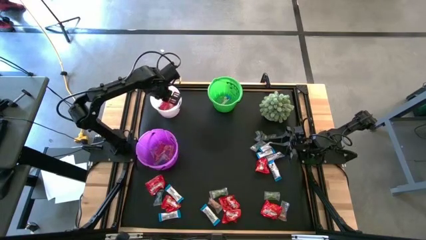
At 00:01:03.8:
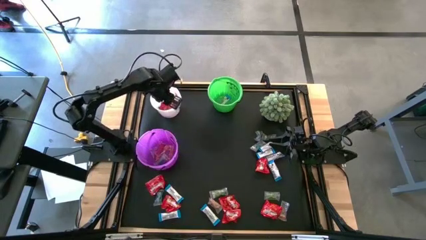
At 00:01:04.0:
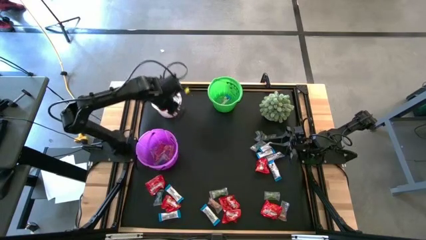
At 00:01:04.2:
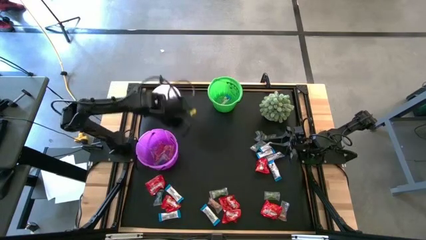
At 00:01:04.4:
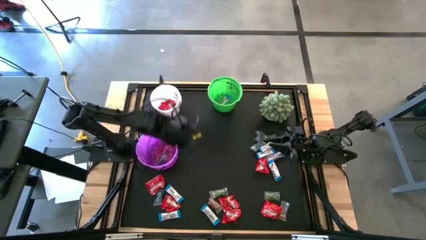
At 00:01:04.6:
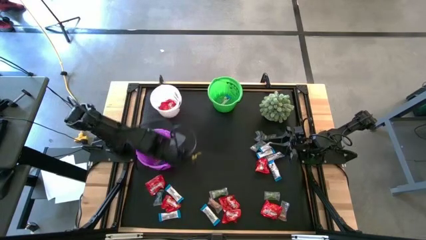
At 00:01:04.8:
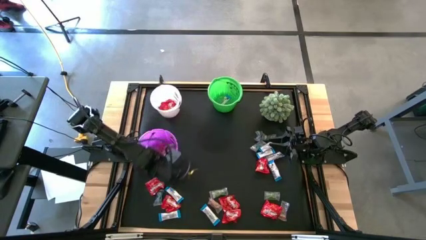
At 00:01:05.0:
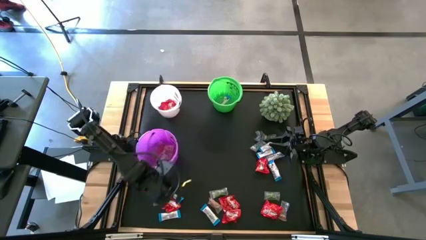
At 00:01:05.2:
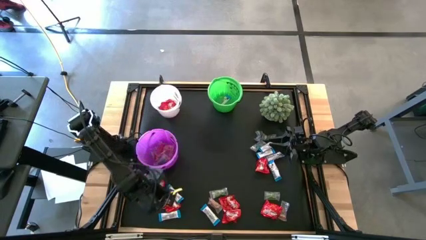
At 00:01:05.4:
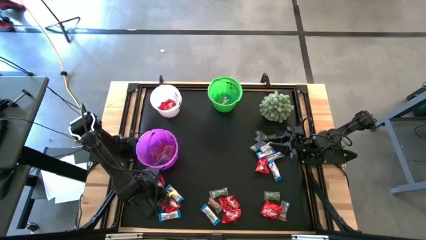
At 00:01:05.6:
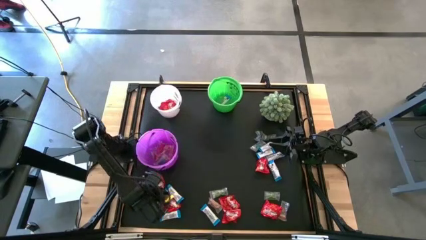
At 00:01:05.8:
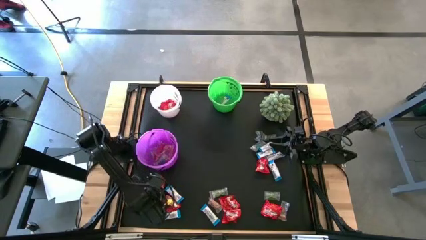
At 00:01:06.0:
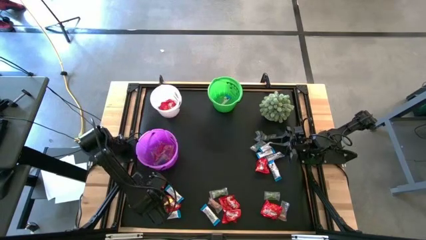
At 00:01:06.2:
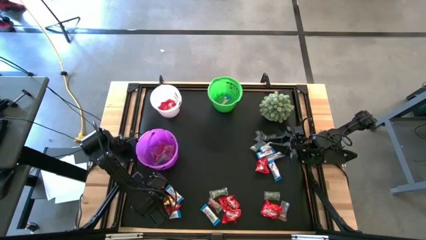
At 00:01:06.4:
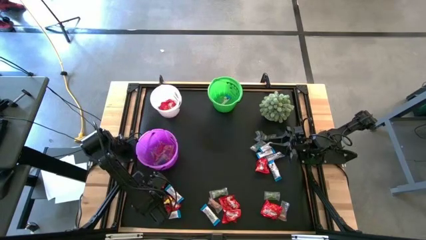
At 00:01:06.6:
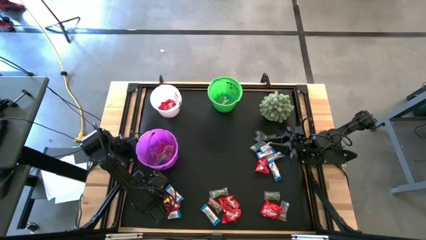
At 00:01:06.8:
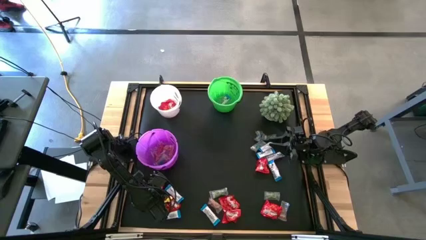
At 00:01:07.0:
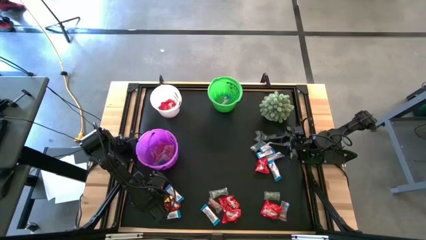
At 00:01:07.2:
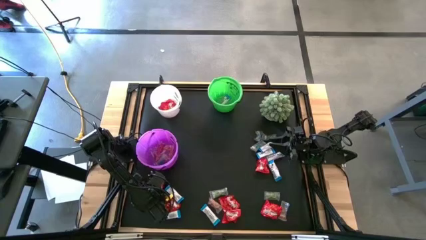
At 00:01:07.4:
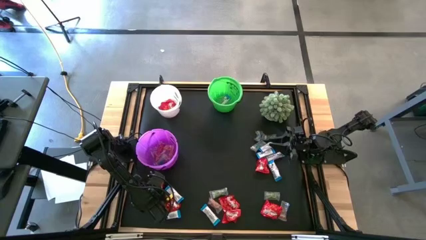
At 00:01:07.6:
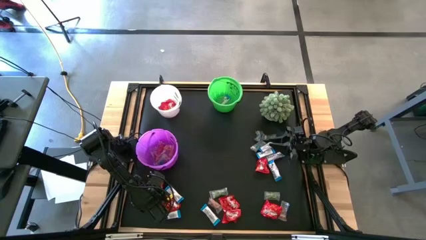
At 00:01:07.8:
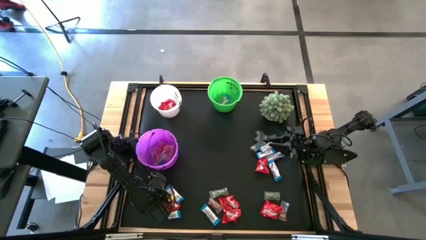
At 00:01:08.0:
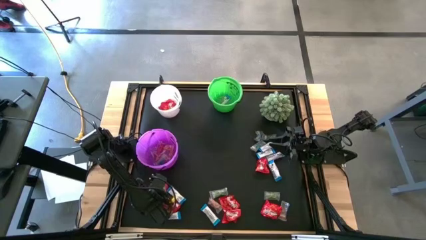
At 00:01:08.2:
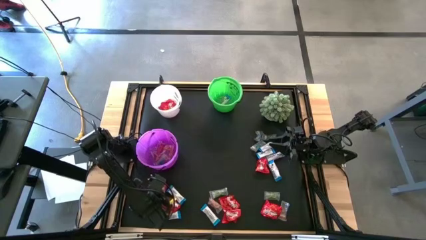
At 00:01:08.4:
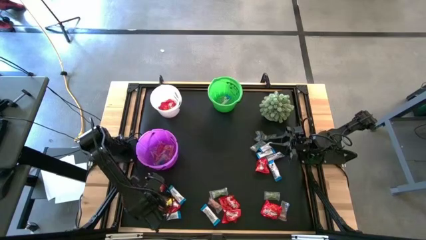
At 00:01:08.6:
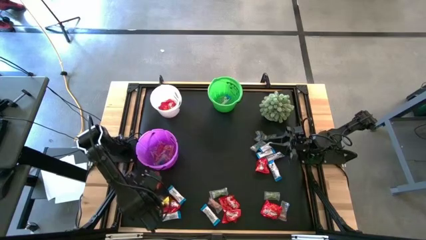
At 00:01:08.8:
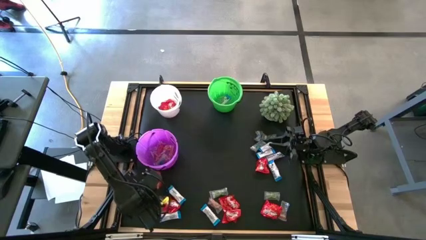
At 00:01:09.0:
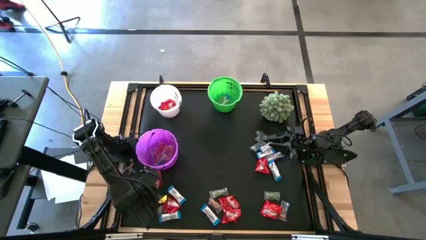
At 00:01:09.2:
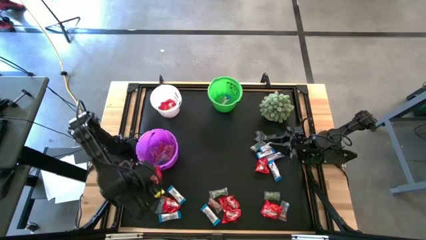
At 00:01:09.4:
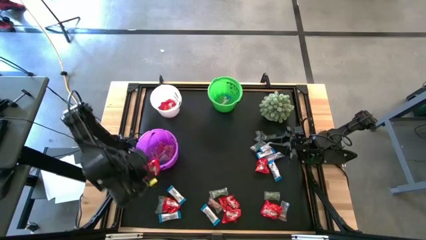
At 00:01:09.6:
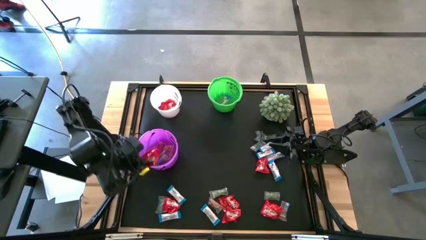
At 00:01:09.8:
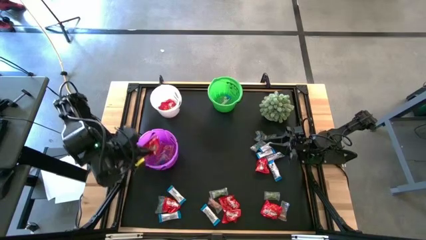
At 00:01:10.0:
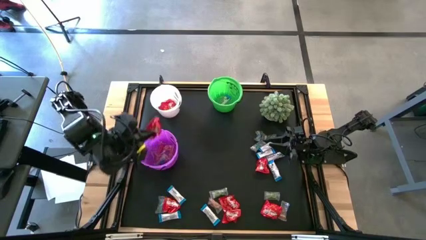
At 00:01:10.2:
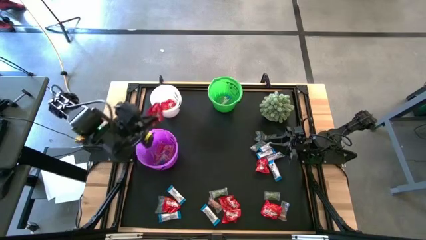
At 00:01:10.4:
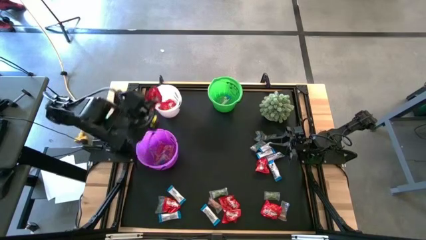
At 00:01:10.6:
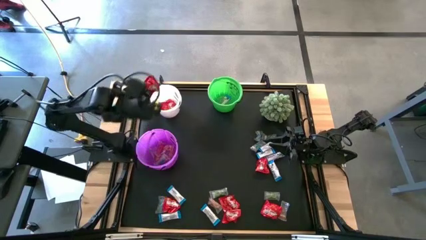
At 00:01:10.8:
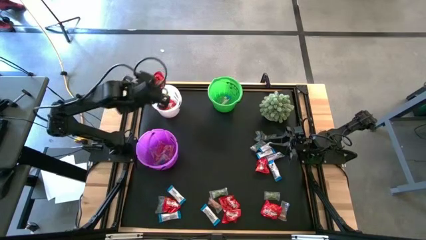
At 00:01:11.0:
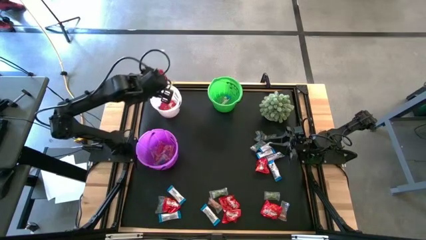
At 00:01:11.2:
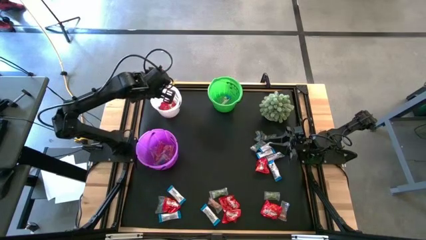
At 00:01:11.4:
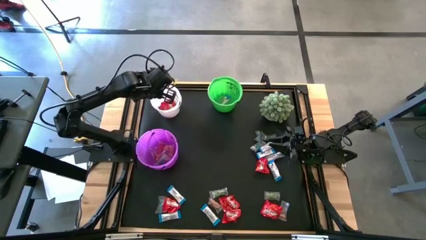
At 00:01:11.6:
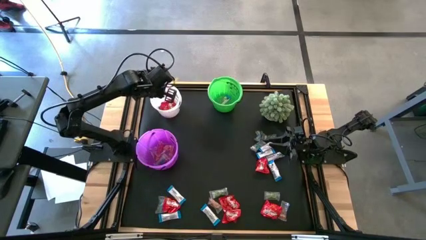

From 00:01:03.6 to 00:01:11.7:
Task: Sort candy
Put the red candy into the white bucket

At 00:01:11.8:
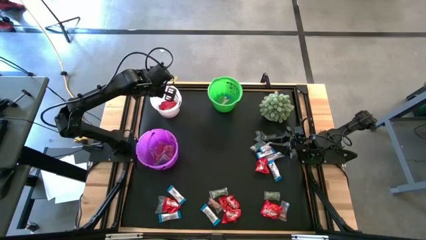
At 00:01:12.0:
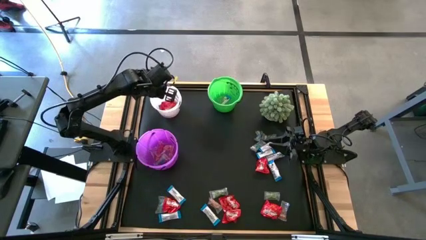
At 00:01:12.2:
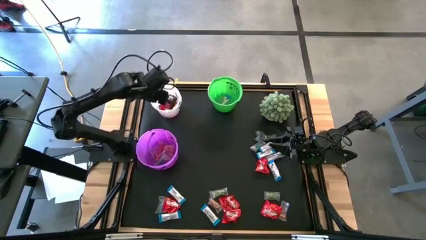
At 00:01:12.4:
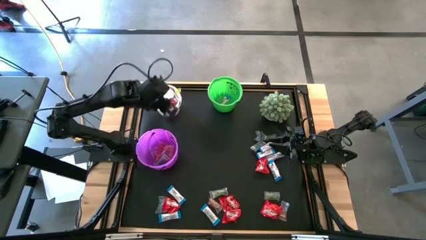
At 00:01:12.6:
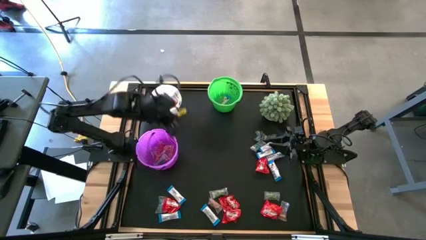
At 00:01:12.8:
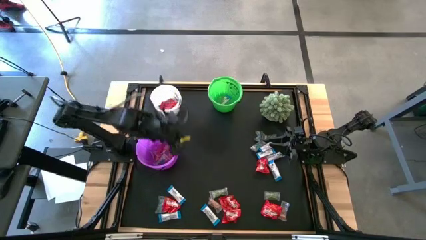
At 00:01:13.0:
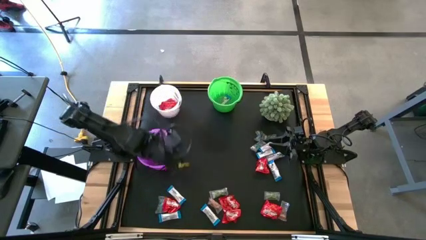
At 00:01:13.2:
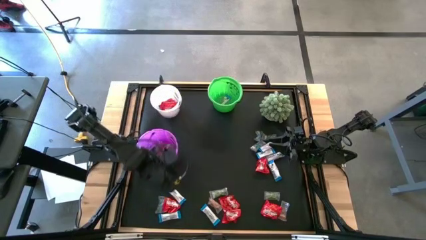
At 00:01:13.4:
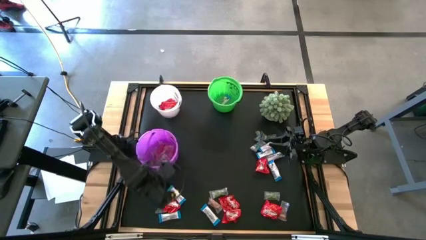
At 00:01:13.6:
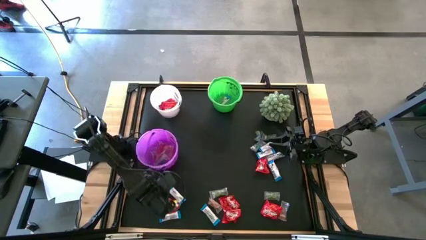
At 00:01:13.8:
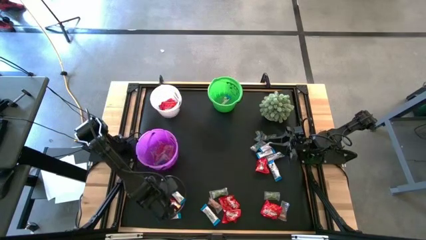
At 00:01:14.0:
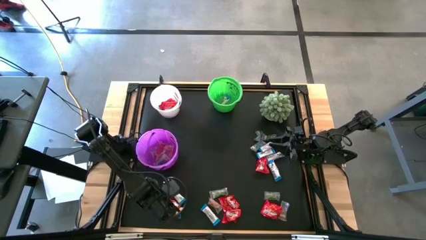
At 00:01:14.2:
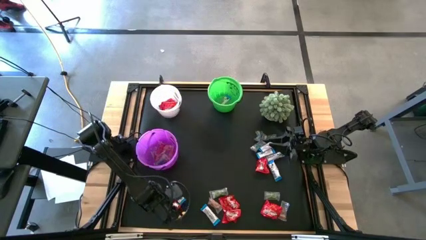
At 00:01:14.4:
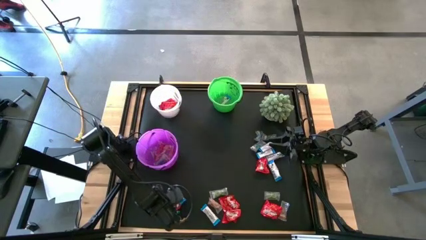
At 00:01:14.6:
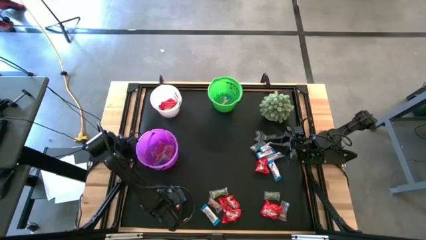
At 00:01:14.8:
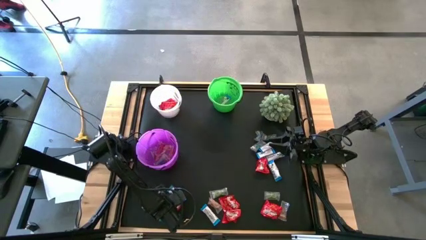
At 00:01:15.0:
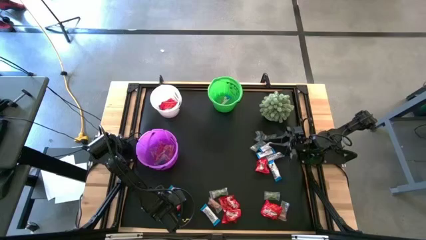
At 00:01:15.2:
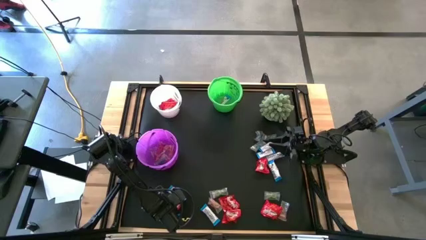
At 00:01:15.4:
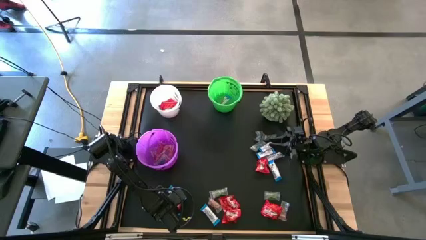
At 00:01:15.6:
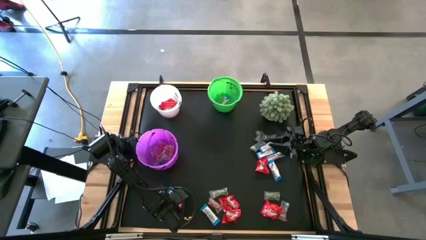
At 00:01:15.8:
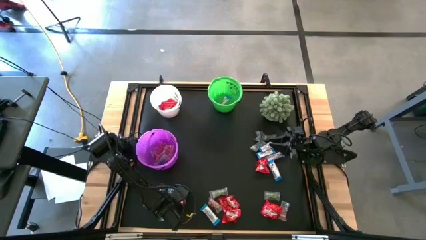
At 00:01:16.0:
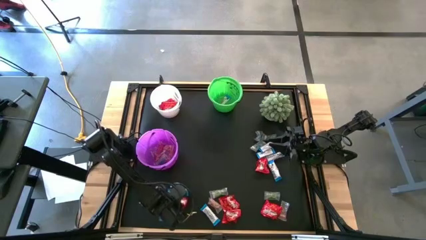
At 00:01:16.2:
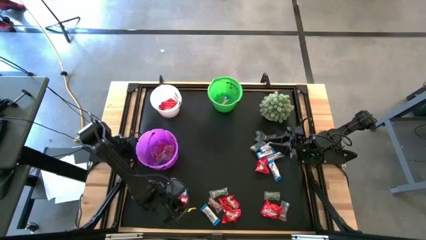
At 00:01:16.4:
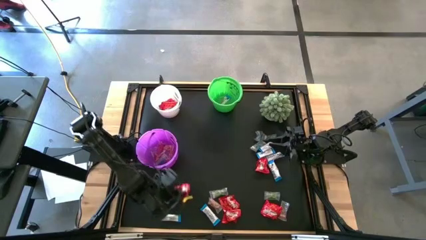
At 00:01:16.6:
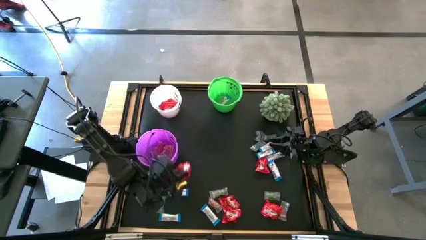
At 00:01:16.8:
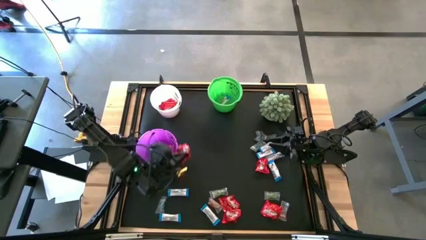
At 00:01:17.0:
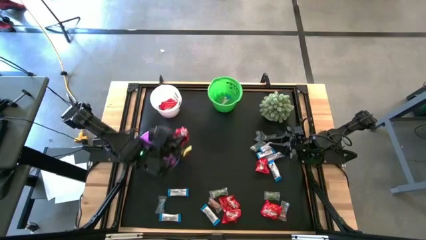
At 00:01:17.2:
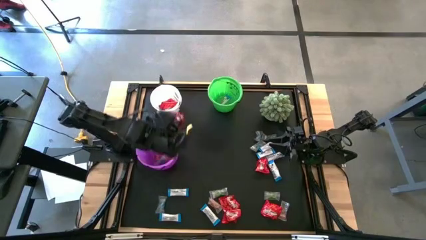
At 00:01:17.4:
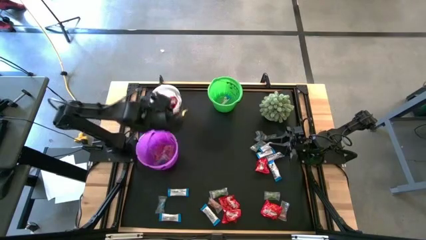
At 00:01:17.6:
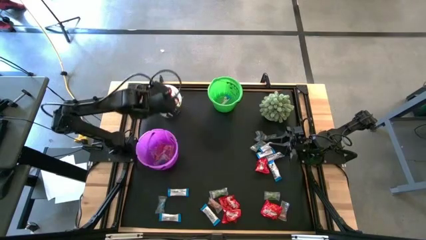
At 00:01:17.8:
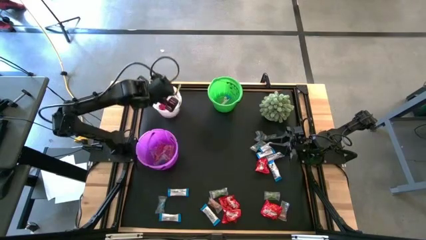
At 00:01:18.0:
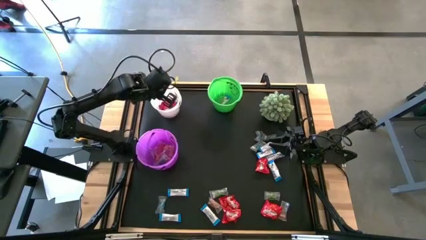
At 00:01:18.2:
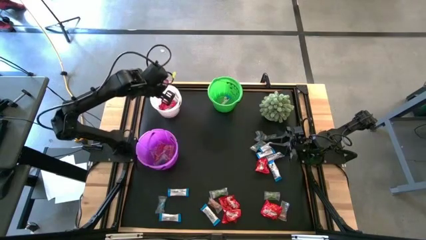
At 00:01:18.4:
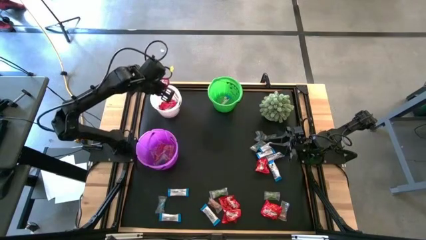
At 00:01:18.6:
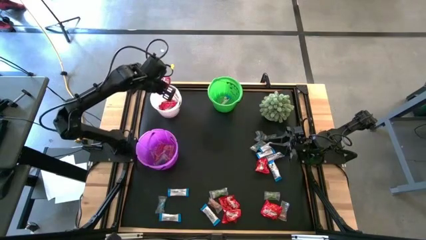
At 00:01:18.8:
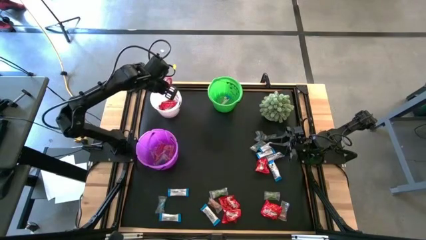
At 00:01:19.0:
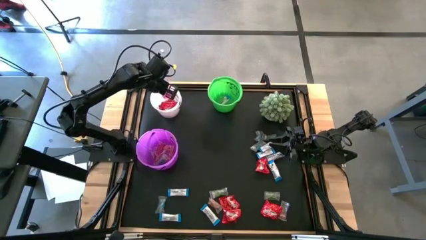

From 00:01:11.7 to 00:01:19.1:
Put the red candy into the white bucket
